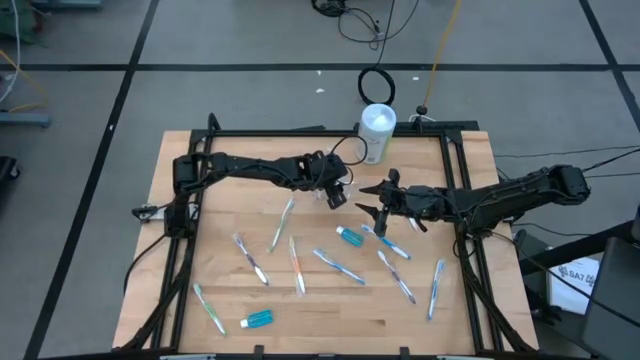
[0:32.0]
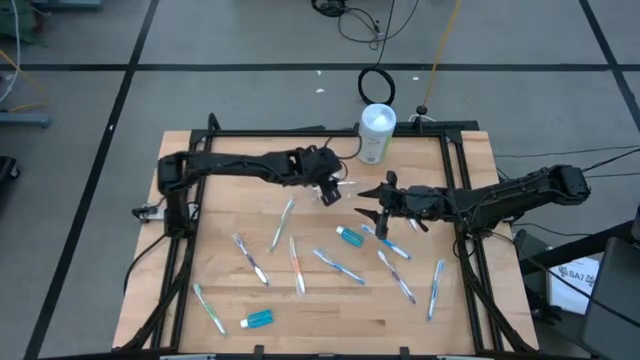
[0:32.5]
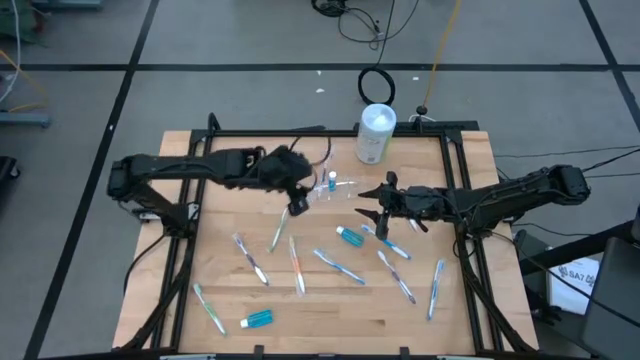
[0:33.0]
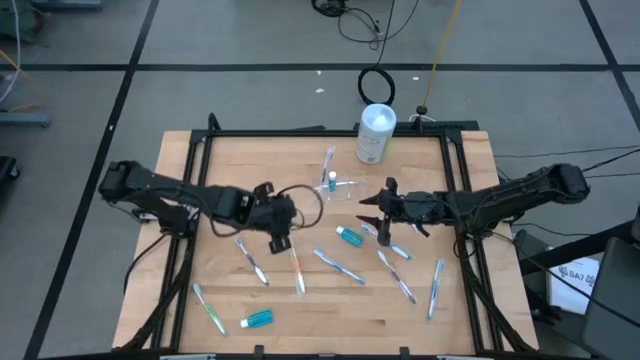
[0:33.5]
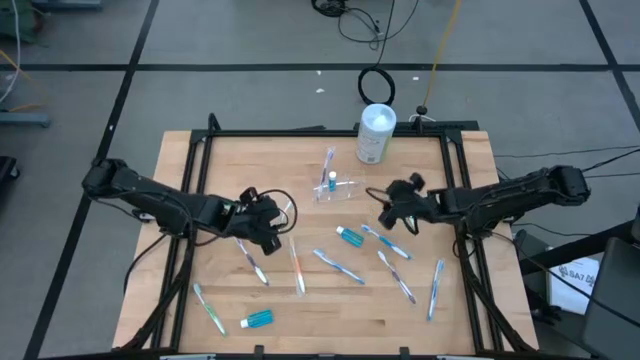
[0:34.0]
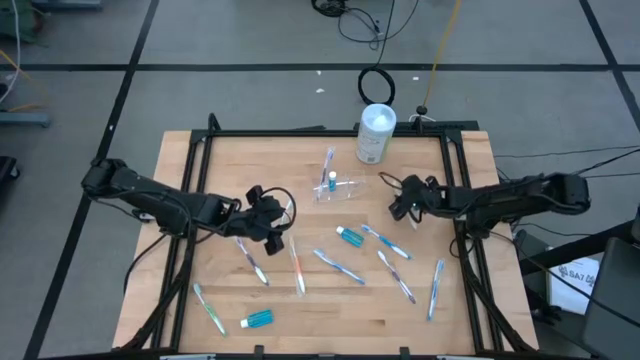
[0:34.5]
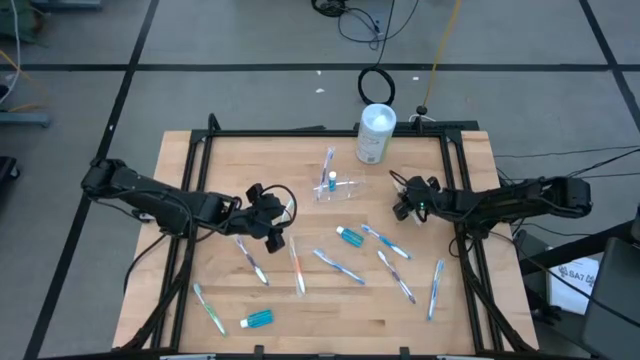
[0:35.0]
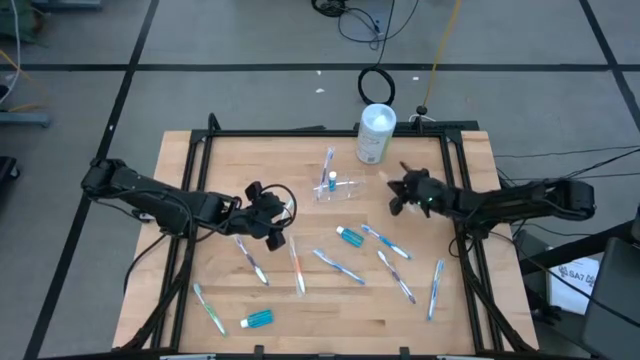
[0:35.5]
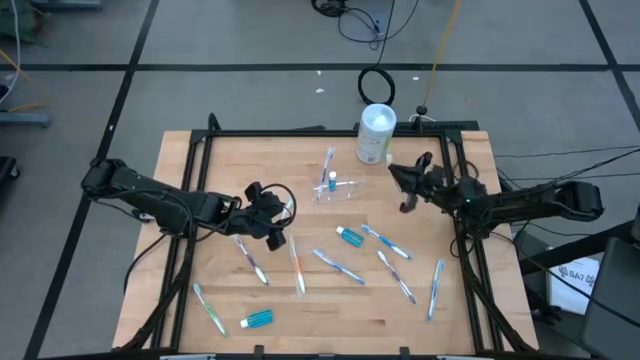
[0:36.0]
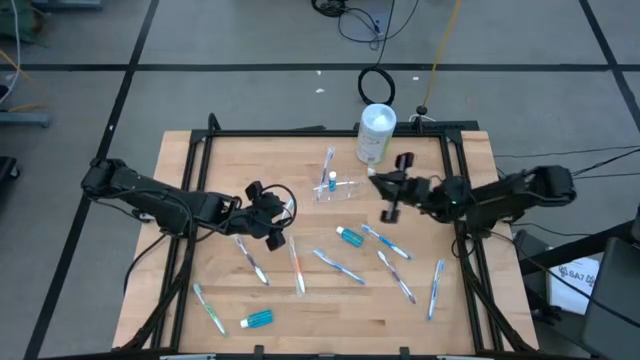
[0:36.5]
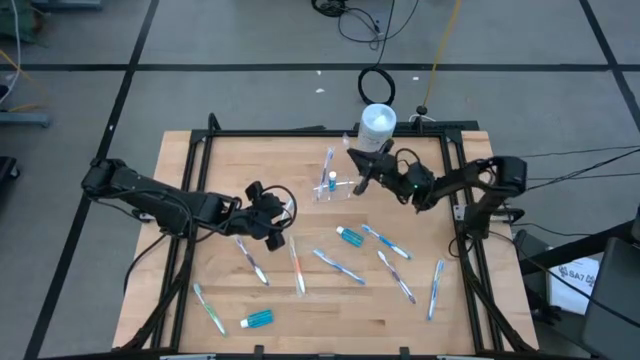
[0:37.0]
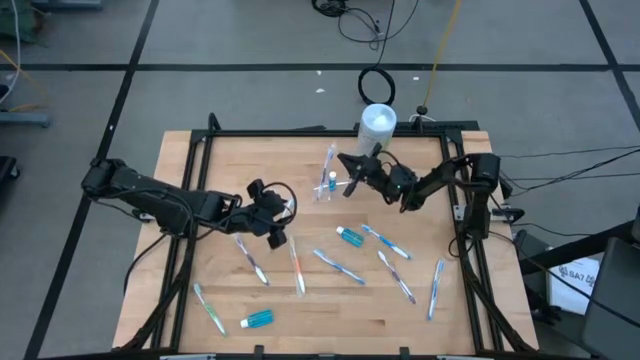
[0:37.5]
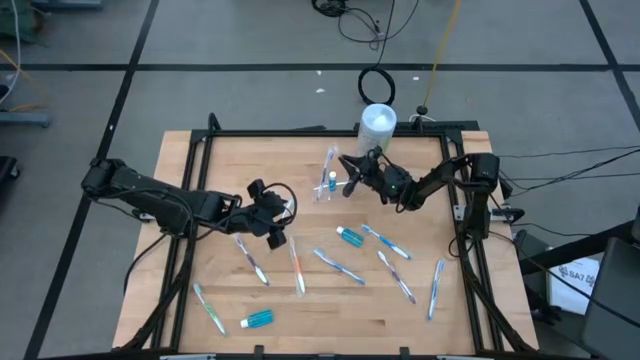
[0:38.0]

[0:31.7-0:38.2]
Task: Pick & Place toothbrushing station
Put the right orange toothbrush into the transparent organizer

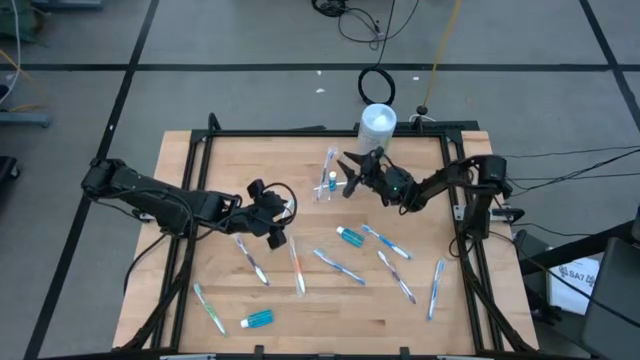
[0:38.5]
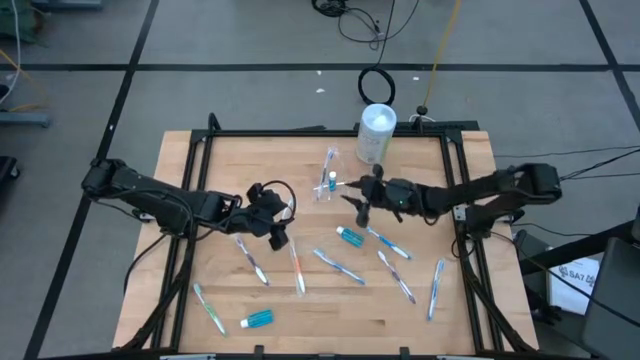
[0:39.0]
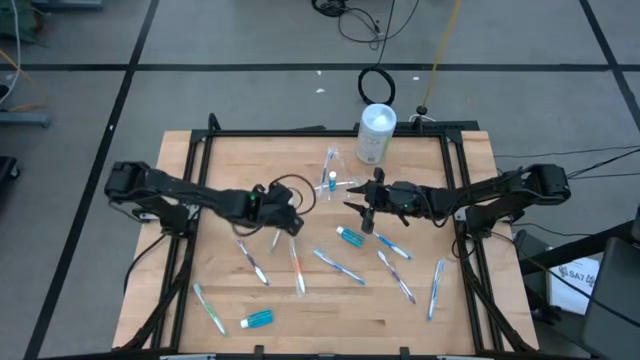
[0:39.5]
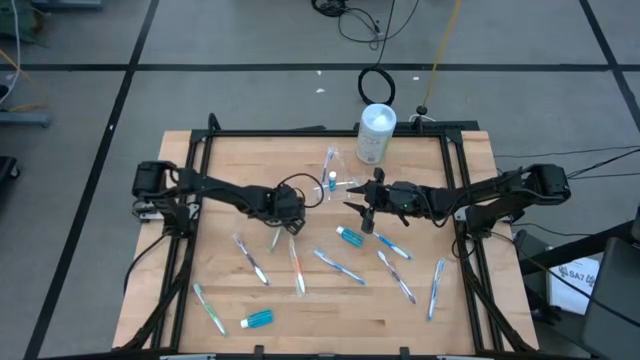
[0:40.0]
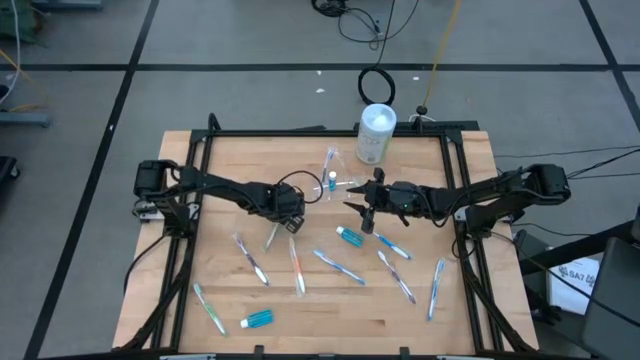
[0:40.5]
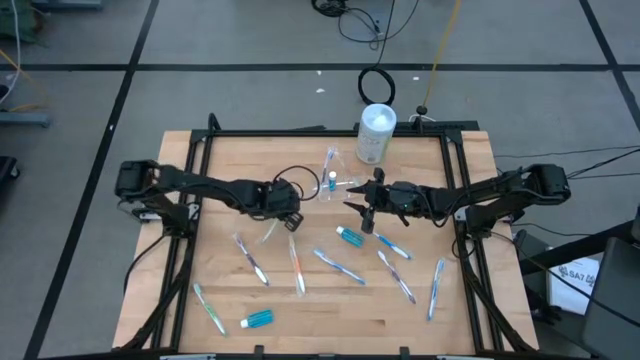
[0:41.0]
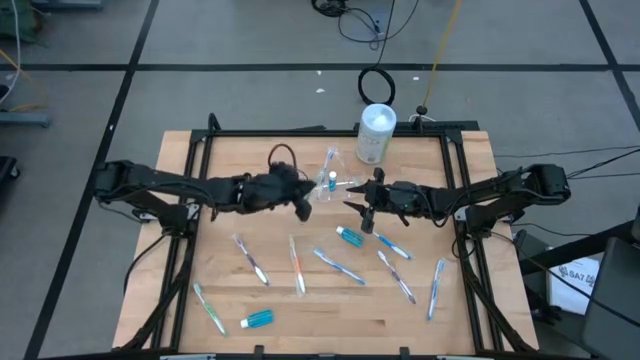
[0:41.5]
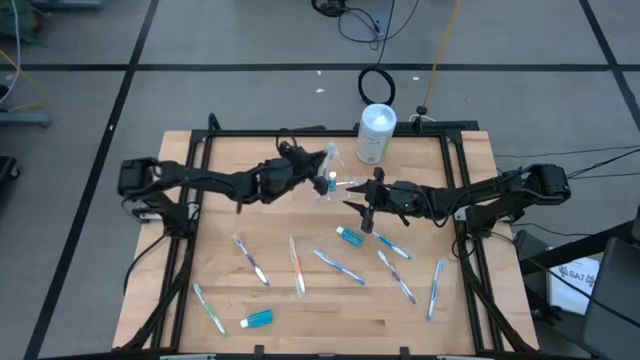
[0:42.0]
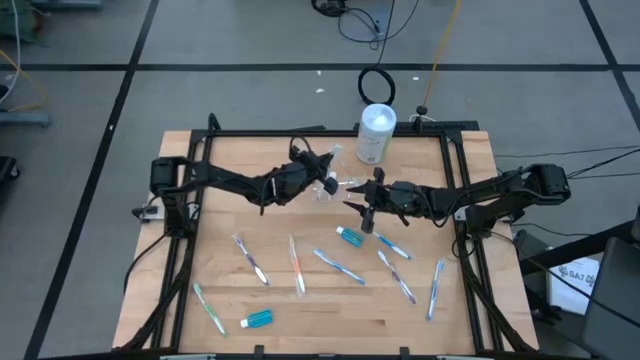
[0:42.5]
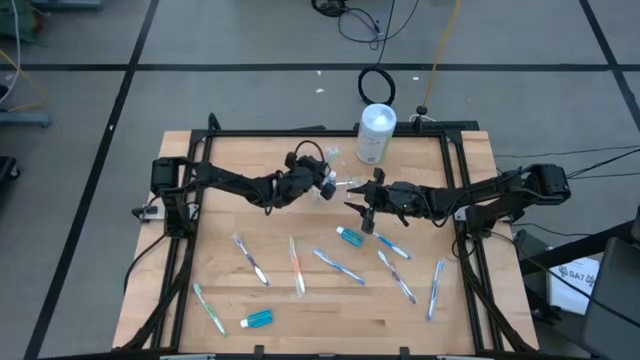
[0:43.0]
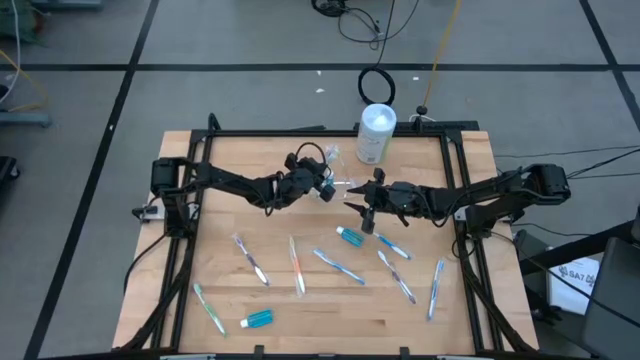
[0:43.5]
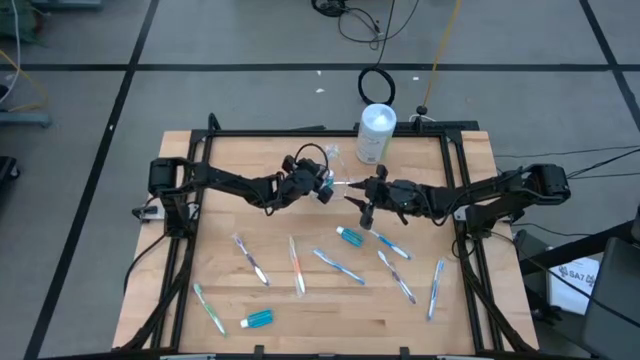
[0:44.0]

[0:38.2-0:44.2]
Put the top green toothbrush into the transparent organizer

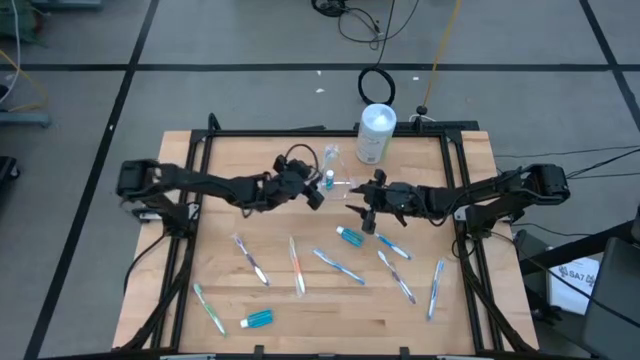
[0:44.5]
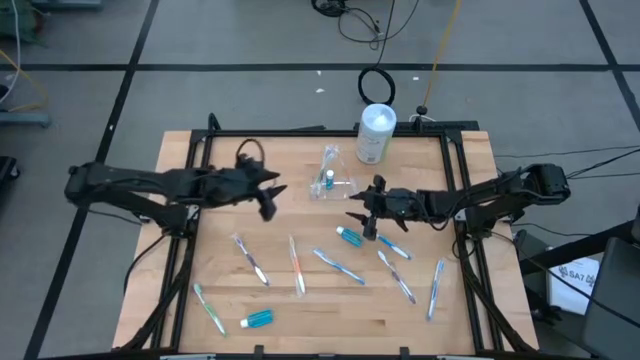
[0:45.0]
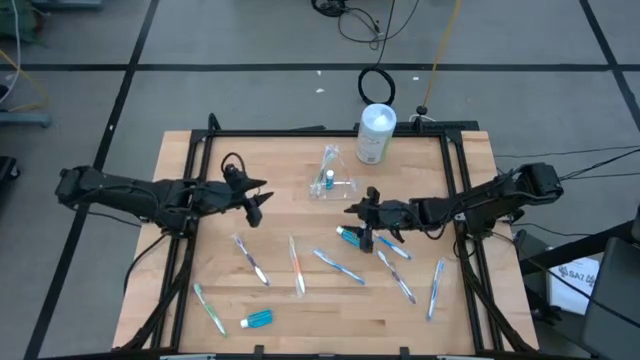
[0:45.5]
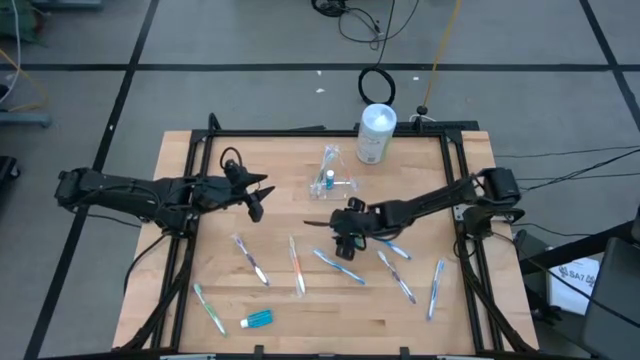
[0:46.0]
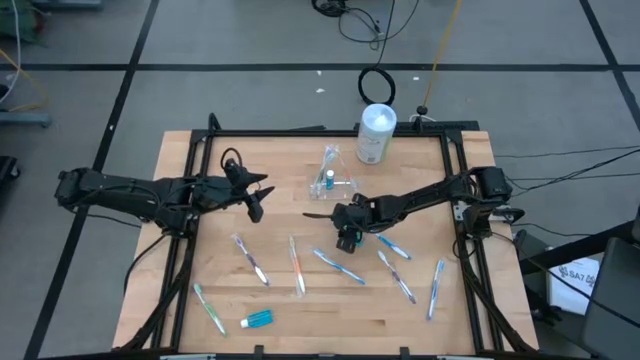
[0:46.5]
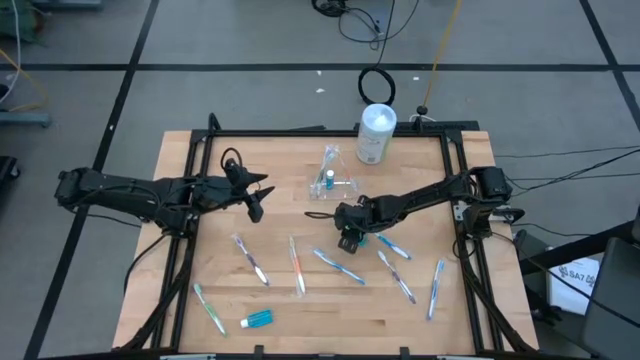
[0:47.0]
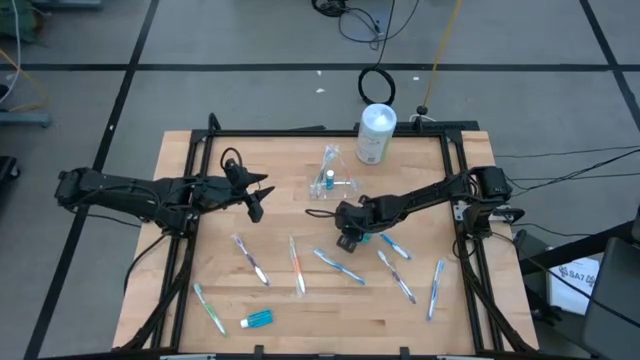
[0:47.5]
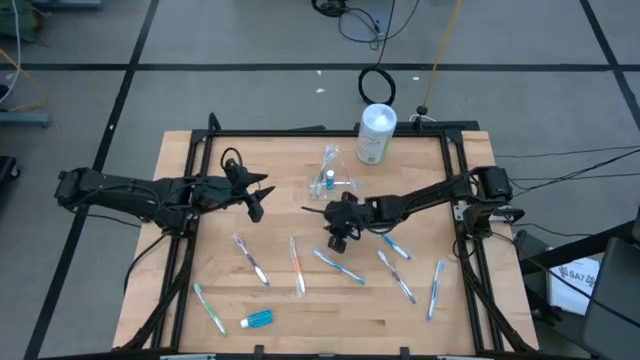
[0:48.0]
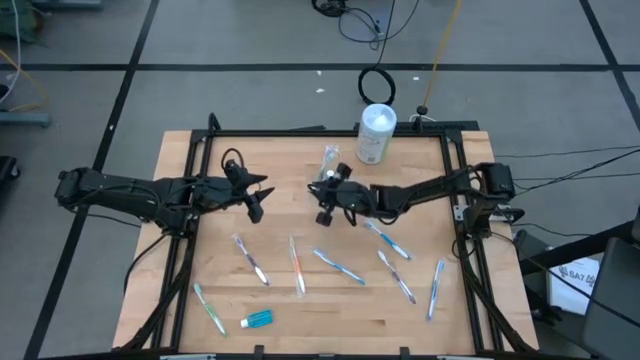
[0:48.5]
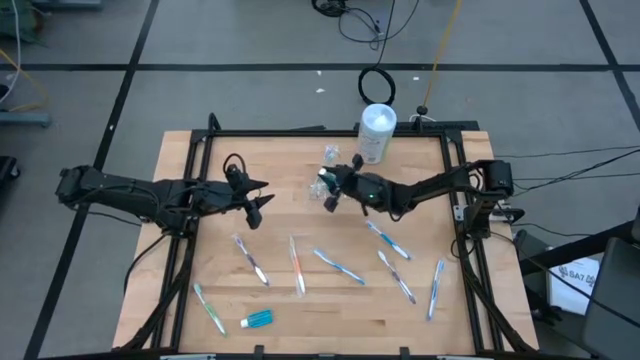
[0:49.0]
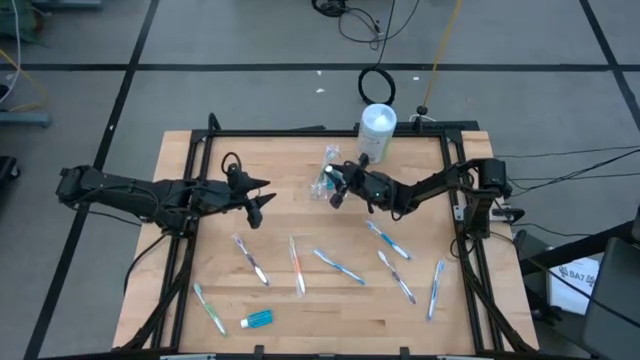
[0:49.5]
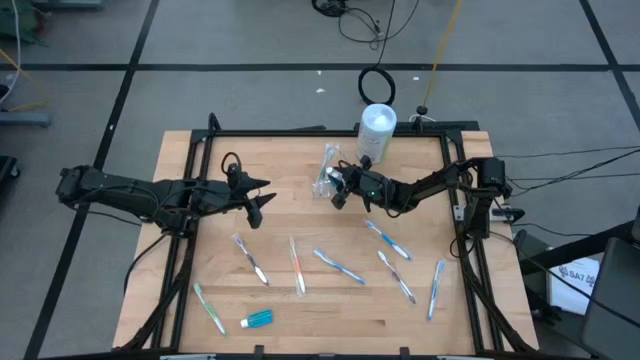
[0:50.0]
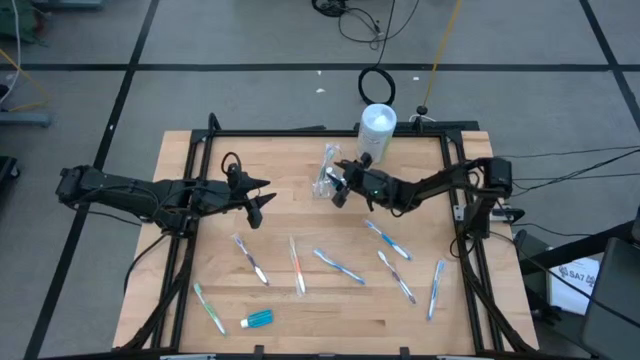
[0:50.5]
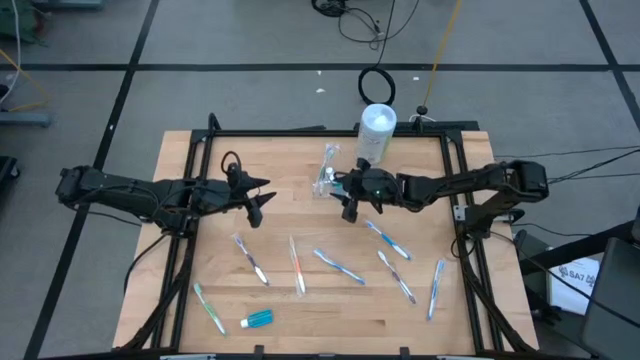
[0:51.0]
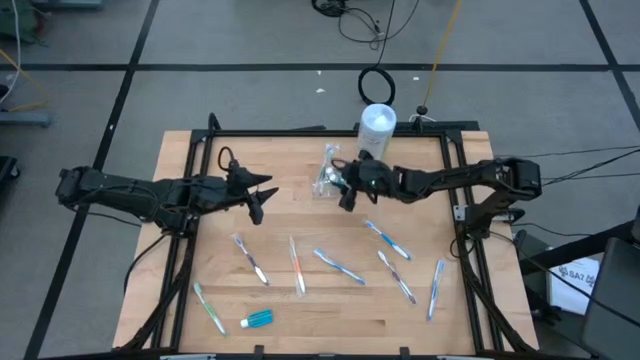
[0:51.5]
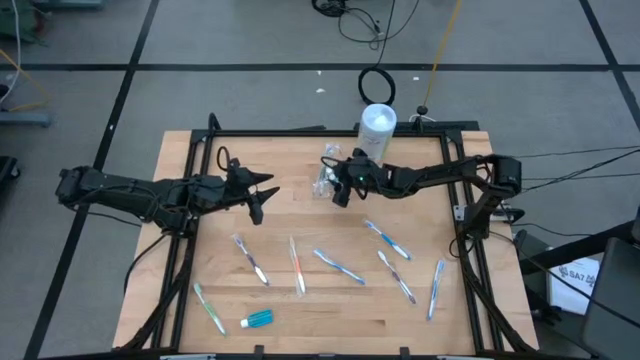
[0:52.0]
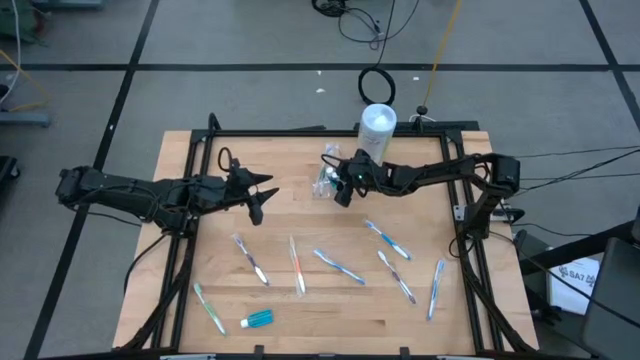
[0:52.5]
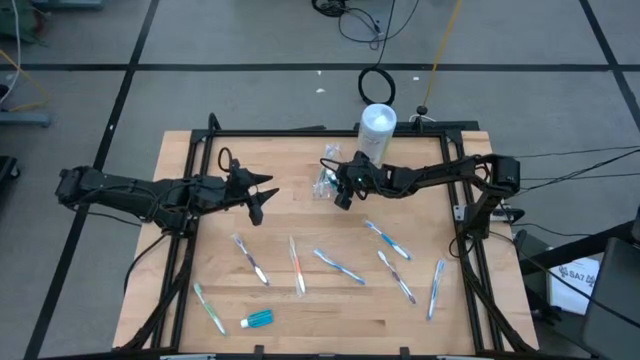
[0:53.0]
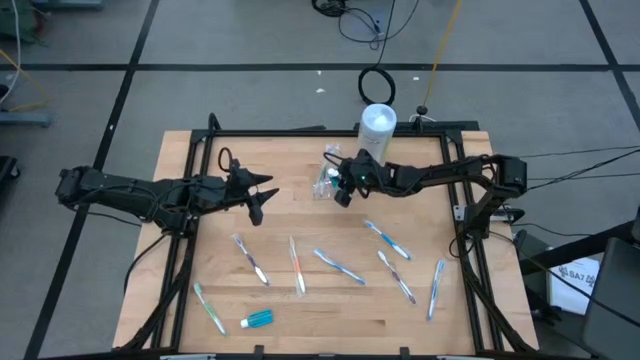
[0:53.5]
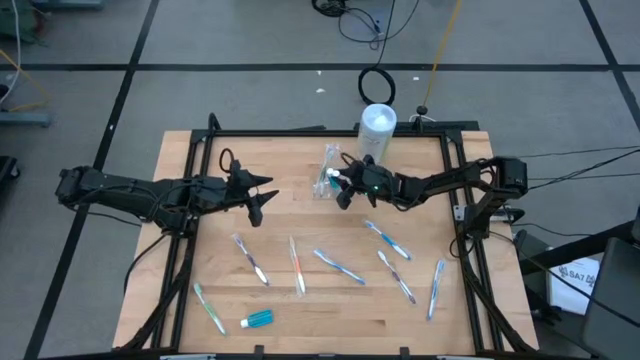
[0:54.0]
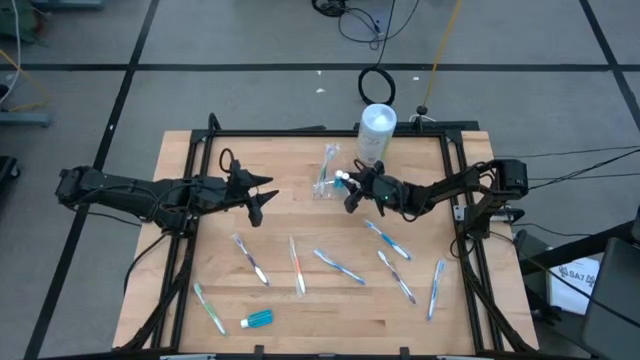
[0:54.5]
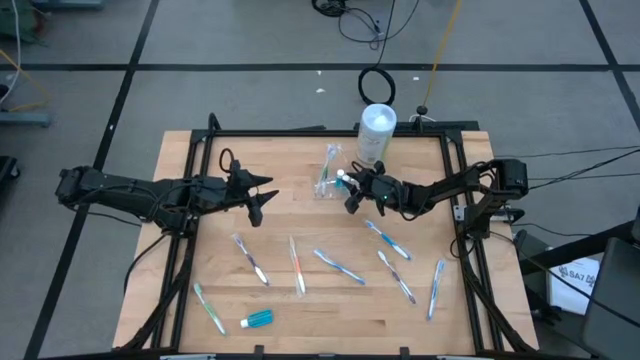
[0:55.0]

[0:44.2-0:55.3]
Put the top blue mouthwash into the transparent organizer
